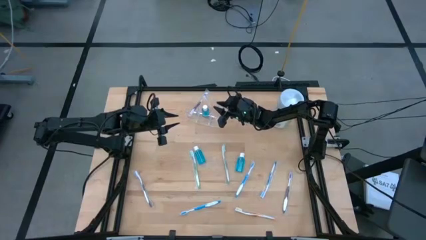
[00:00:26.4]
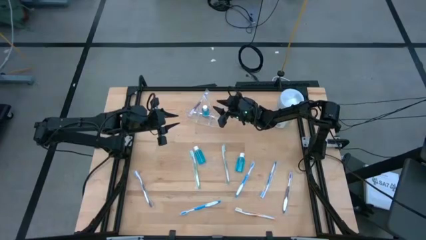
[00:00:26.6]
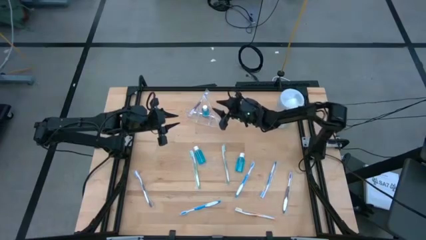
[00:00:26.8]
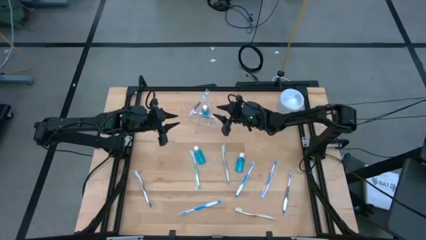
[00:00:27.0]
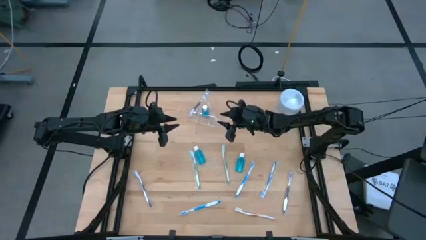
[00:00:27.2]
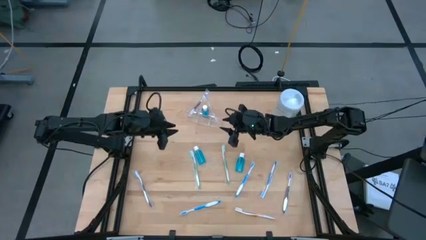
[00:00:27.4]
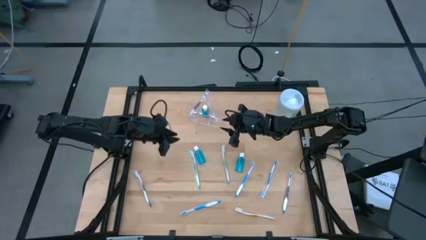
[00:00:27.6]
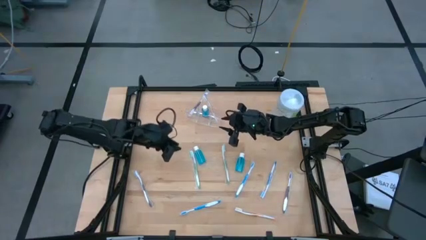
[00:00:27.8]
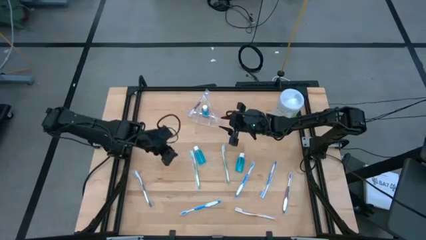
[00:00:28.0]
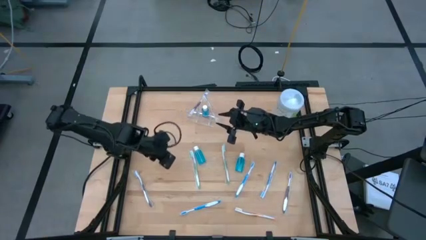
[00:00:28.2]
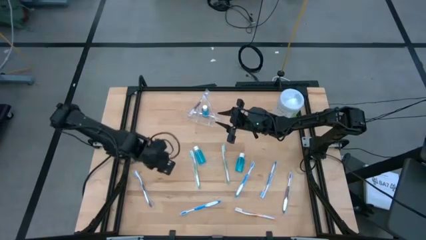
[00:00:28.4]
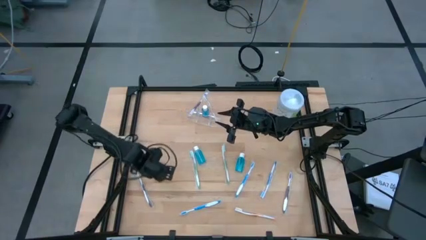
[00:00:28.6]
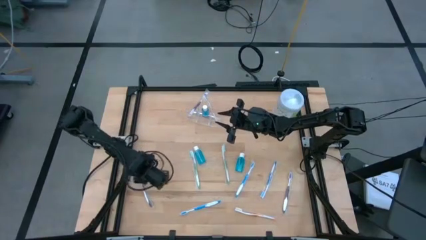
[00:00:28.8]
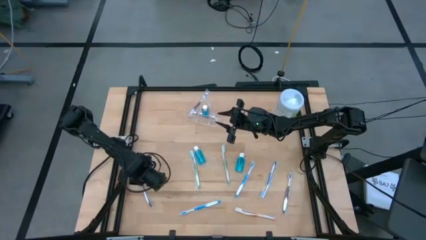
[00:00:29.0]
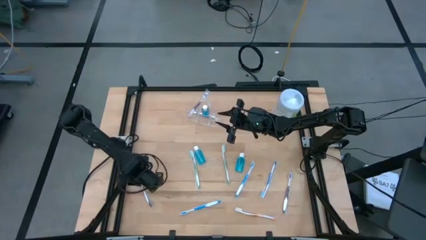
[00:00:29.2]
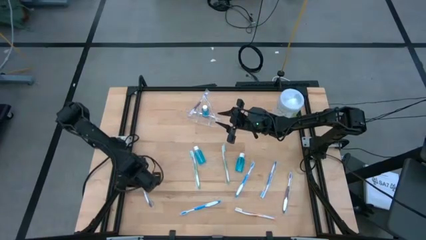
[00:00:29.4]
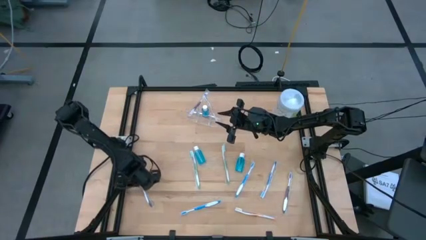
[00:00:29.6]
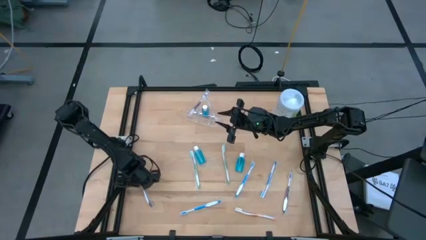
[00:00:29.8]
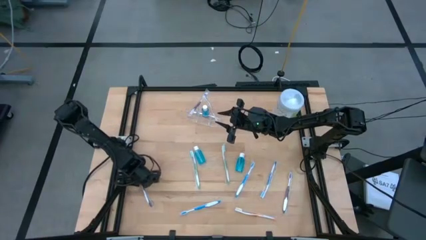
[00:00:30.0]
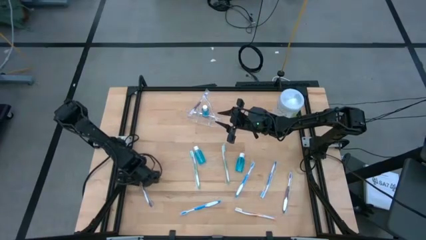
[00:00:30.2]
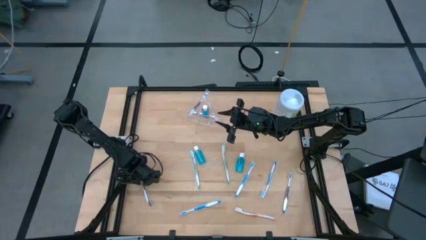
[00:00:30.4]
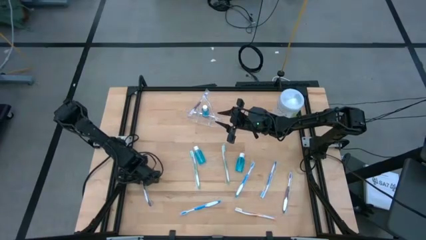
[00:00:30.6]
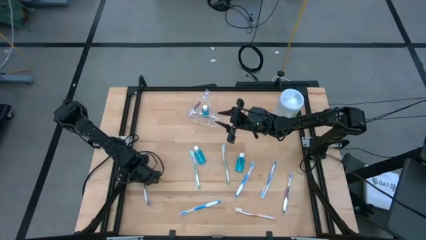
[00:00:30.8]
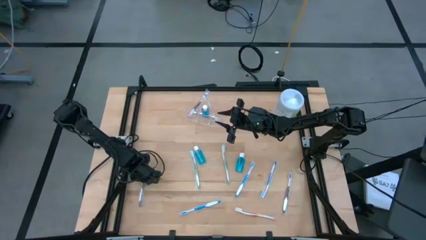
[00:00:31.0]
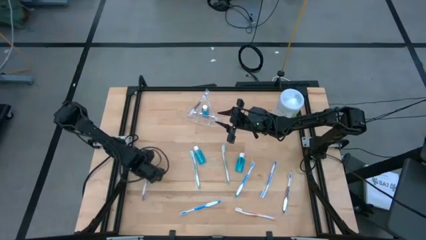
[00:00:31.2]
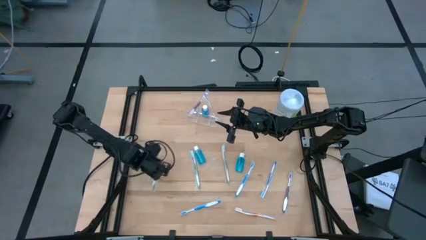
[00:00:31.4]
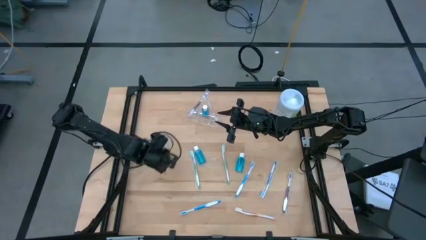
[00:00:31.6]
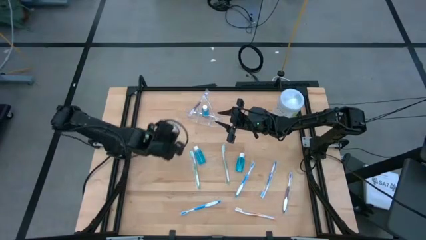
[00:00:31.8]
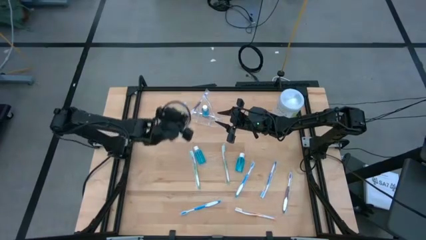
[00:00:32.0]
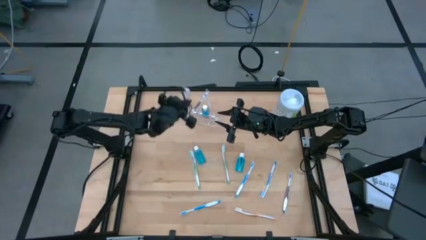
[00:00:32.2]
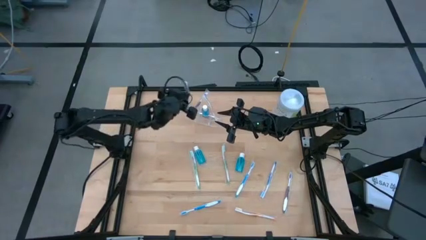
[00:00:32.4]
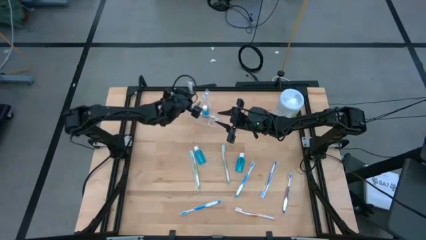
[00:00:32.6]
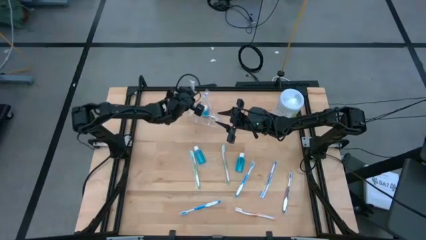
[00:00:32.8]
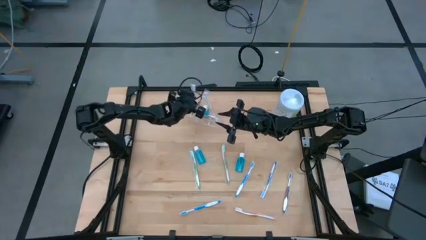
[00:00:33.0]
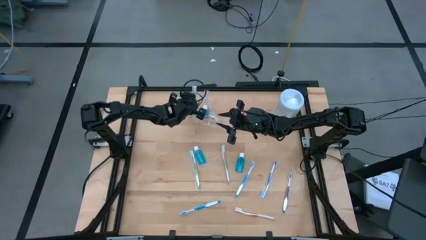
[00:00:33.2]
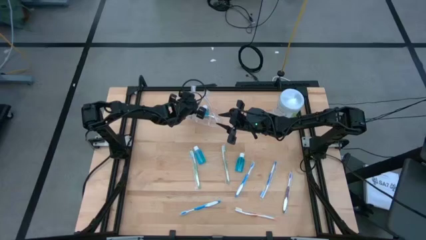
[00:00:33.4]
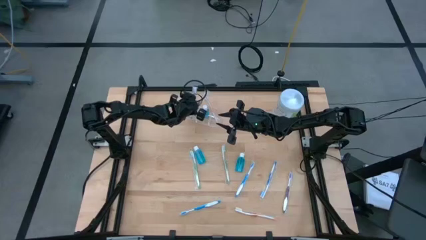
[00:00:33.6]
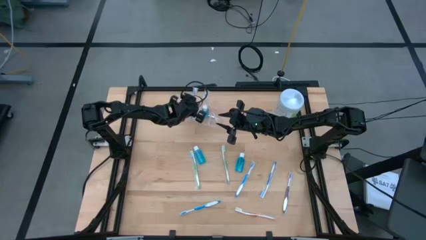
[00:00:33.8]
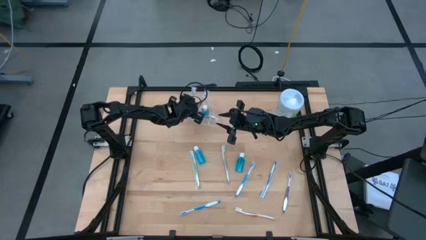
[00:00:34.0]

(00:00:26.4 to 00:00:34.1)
Task: Pick & Place toothbrushing station
Put the left purple toothbrush into the left section of the organizer

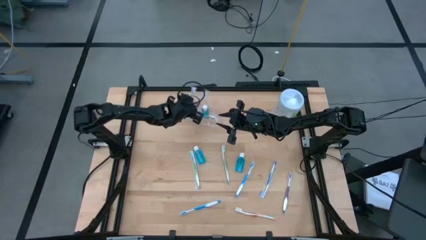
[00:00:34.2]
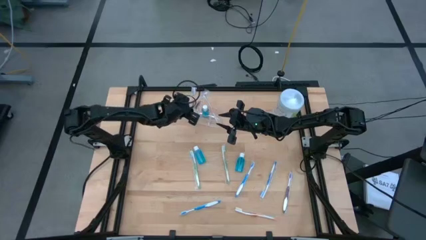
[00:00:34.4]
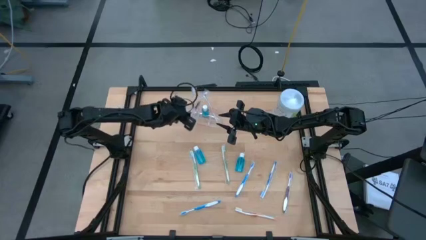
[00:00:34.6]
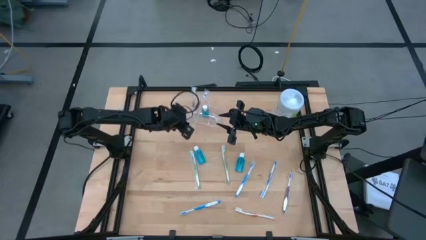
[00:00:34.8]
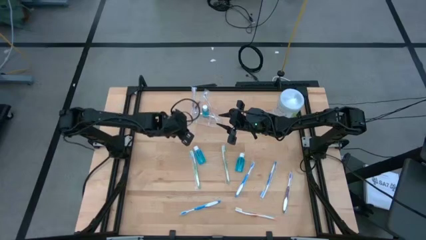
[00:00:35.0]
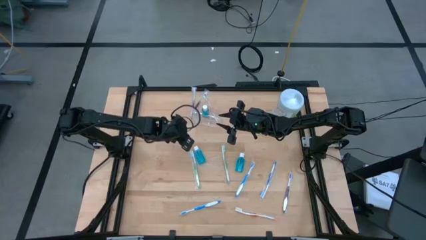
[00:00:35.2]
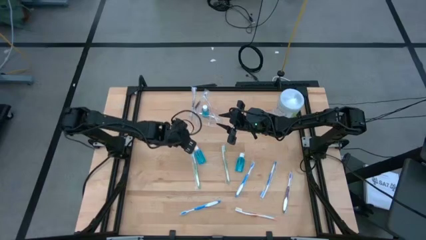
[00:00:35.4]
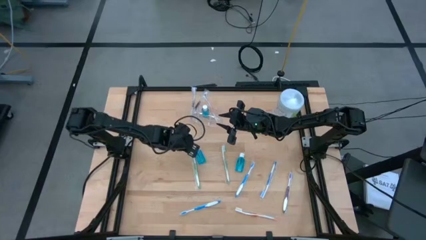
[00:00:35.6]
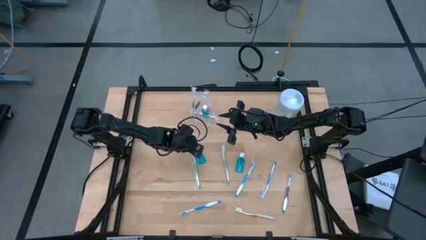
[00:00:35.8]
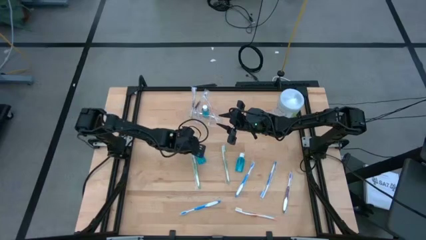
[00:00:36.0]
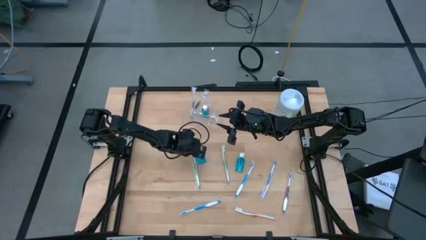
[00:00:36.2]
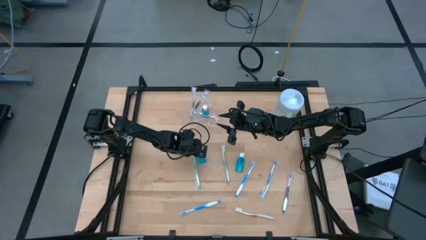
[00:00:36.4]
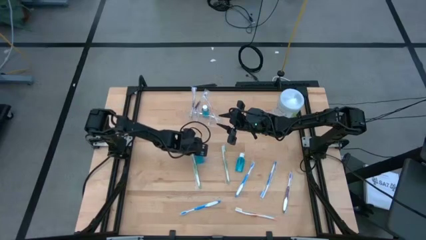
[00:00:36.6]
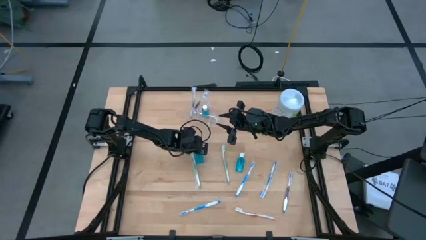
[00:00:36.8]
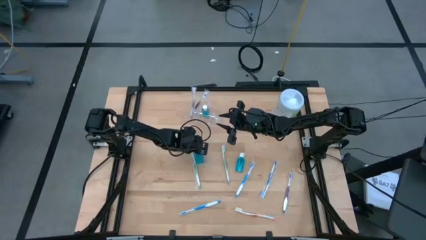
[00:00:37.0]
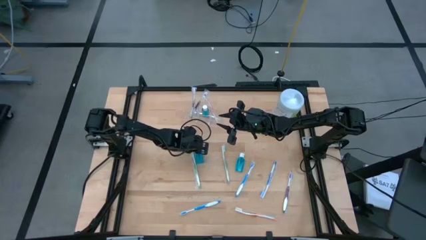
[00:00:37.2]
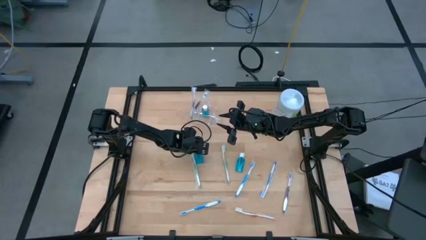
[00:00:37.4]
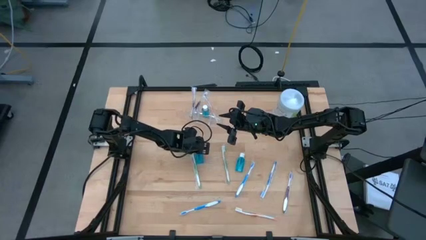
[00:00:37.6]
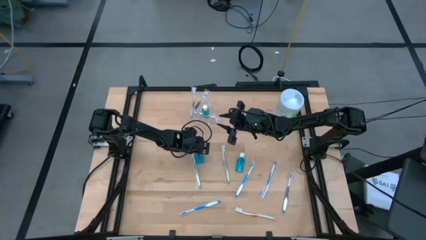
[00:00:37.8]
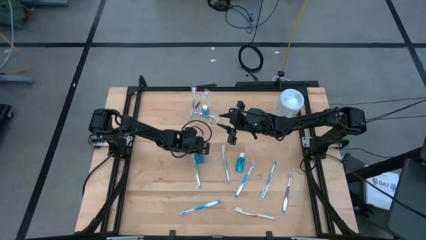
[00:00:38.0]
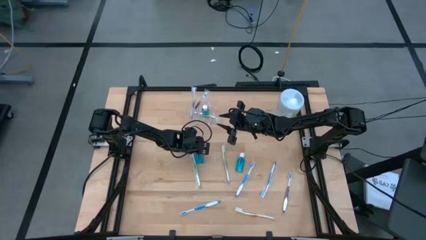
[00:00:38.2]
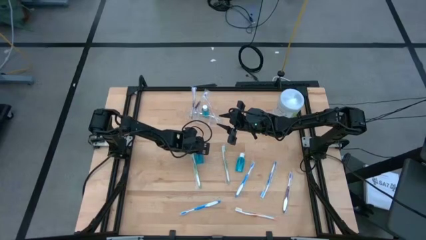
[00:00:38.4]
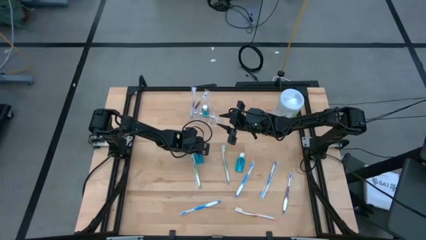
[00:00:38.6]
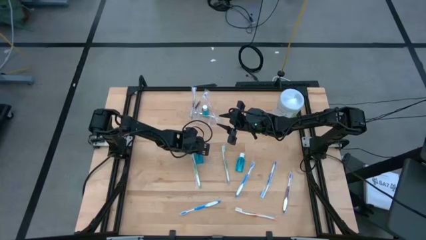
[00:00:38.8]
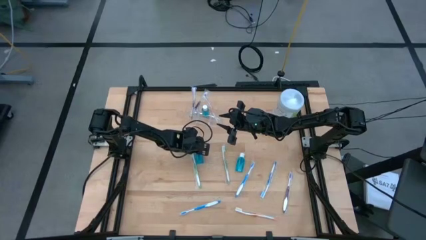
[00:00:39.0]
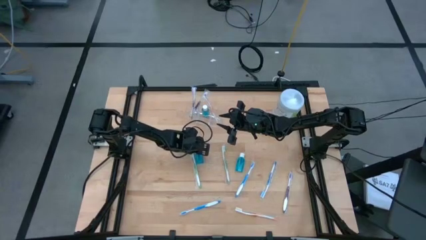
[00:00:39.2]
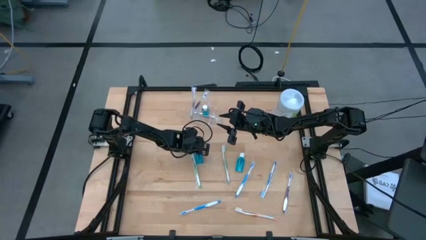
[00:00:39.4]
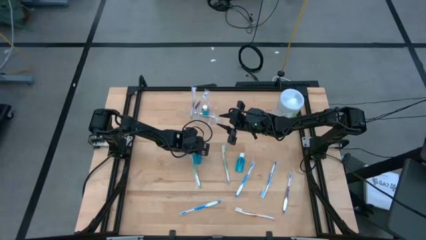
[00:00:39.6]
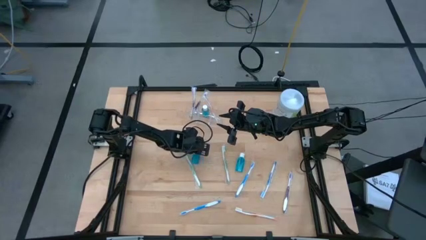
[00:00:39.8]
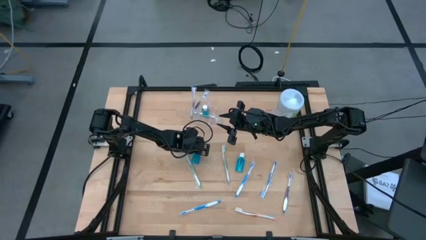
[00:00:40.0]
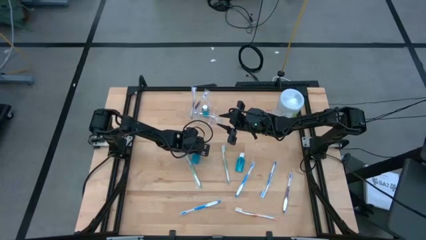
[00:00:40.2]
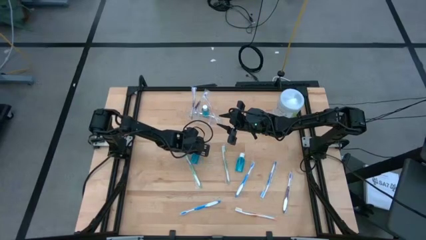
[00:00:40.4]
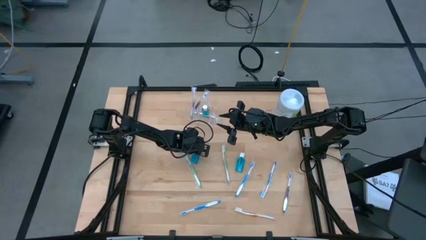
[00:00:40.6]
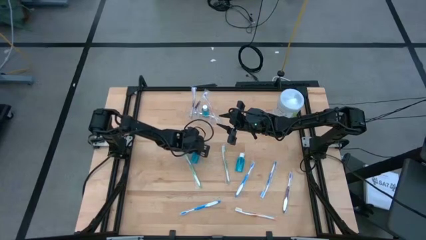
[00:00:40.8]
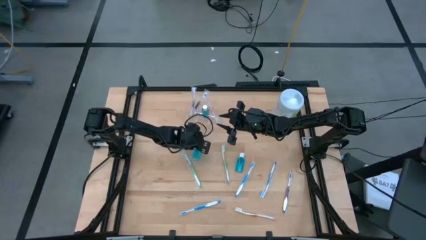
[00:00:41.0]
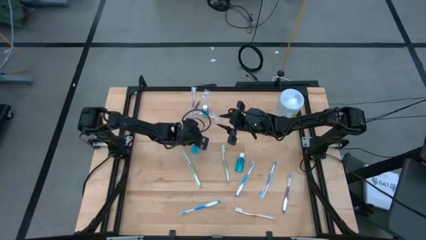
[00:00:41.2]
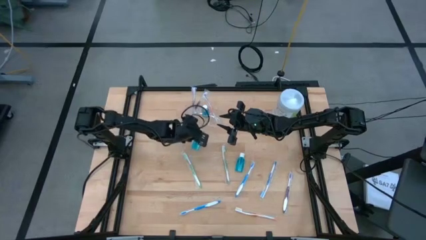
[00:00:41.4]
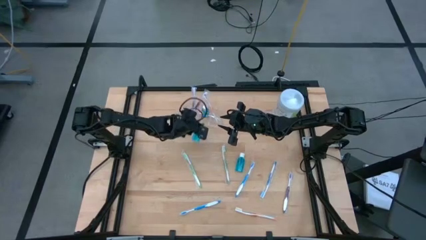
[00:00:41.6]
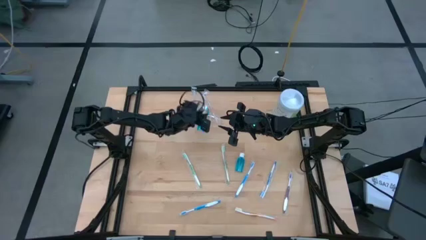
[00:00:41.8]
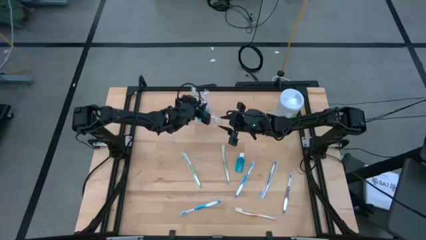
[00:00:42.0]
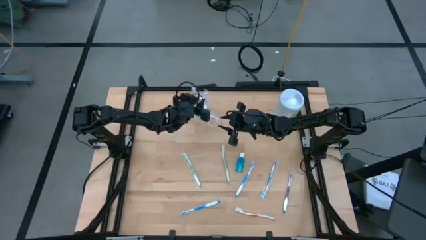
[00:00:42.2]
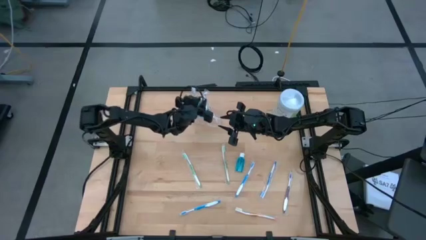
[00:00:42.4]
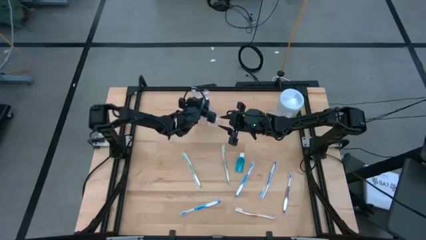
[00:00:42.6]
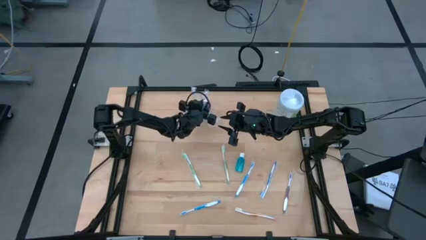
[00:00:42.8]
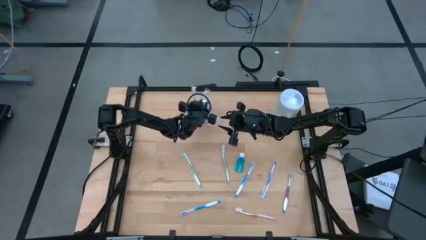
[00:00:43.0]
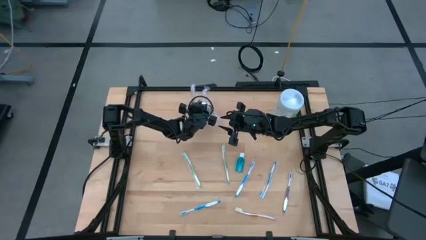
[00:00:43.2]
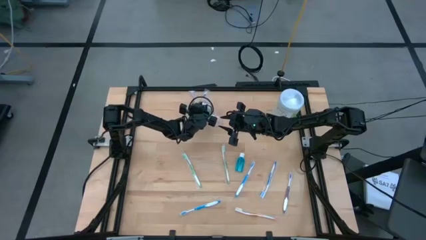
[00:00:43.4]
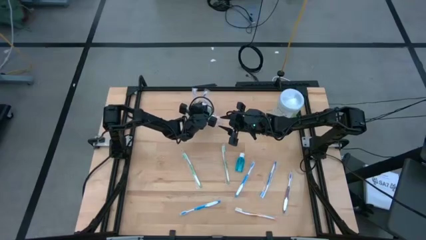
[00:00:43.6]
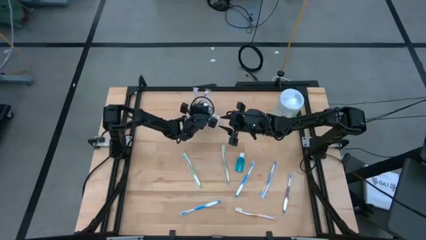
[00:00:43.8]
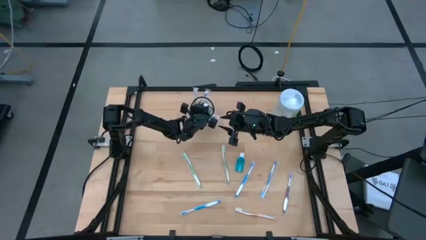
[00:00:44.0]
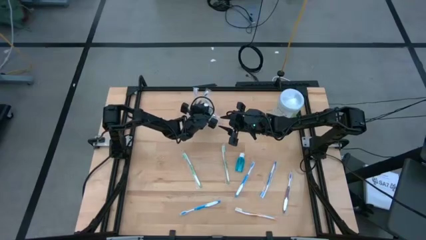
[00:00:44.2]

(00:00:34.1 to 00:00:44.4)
Put the left mouthwash into the middle section of the organizer
